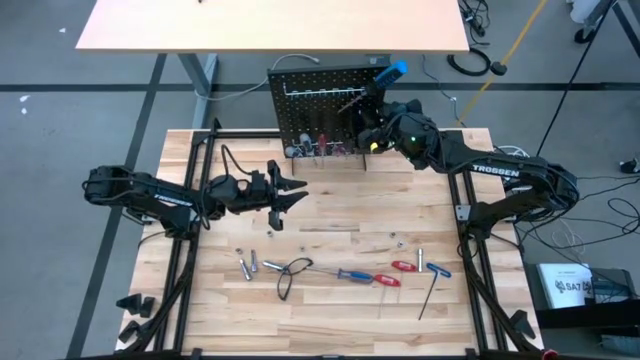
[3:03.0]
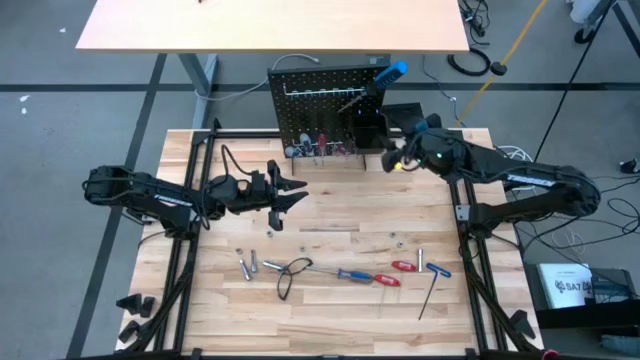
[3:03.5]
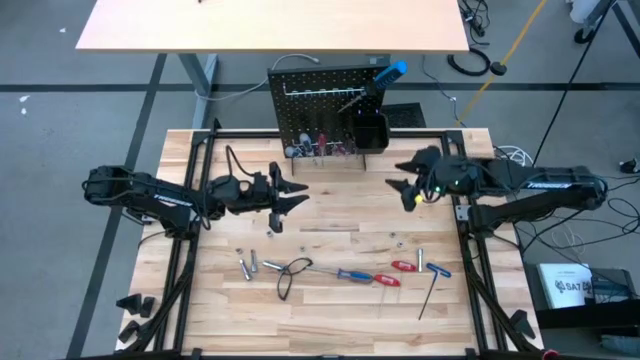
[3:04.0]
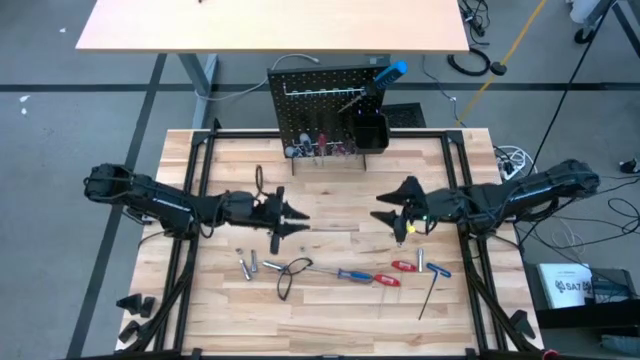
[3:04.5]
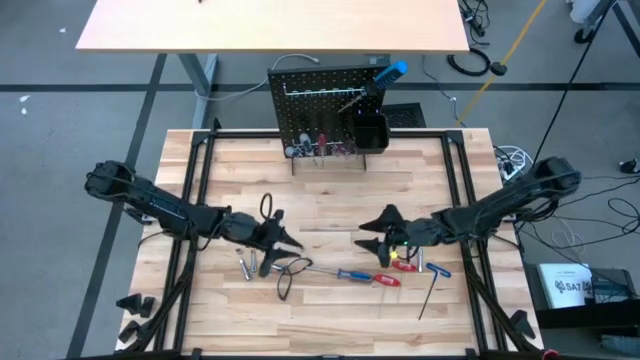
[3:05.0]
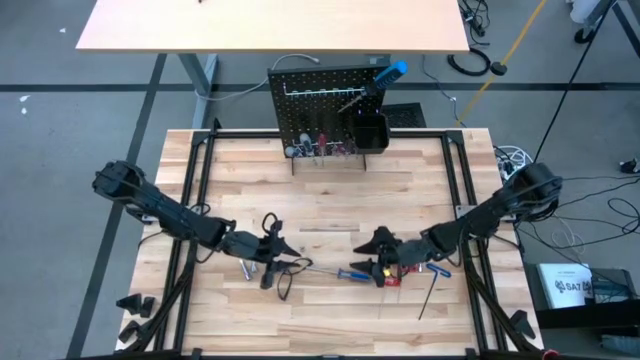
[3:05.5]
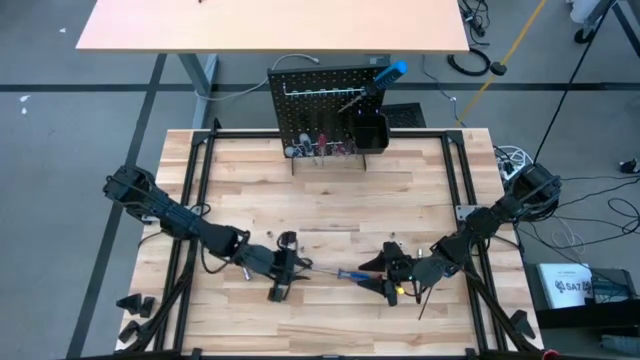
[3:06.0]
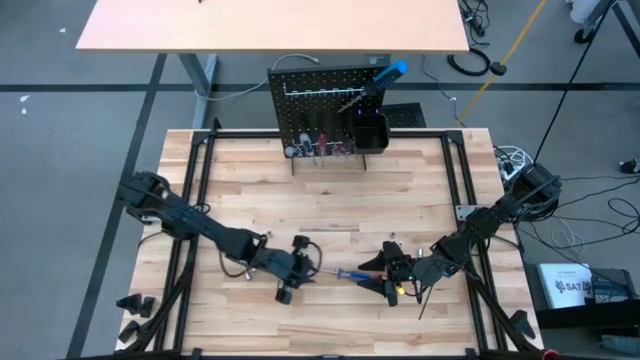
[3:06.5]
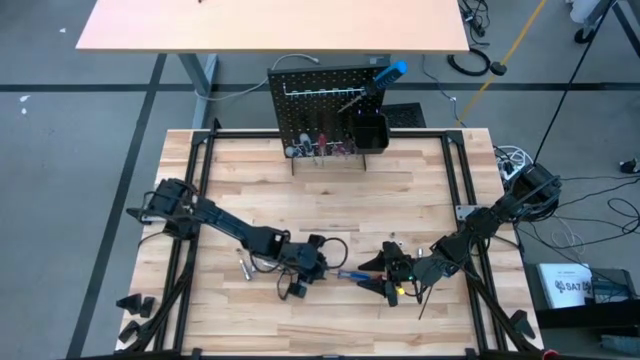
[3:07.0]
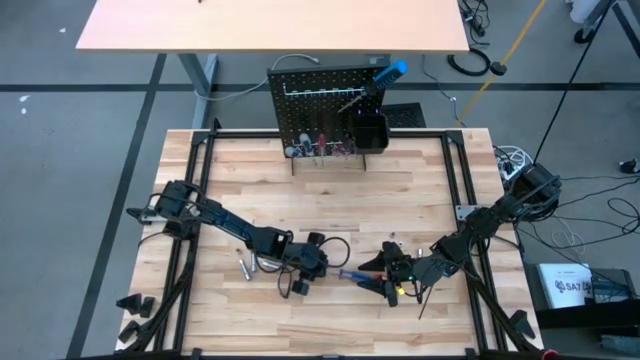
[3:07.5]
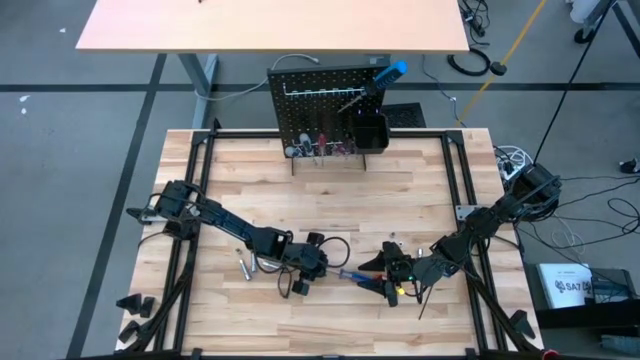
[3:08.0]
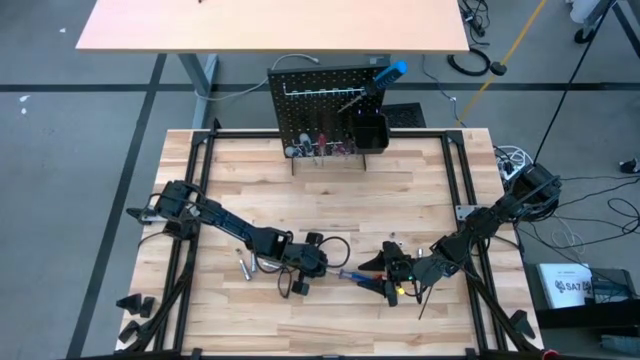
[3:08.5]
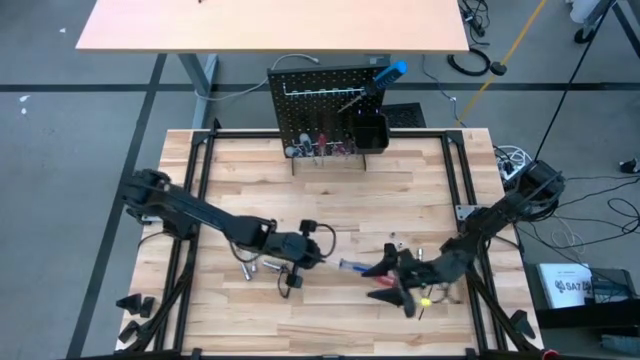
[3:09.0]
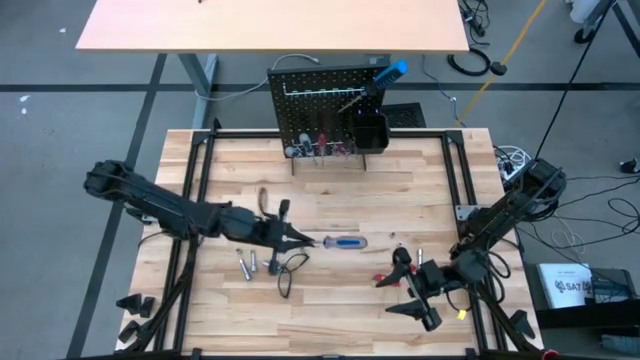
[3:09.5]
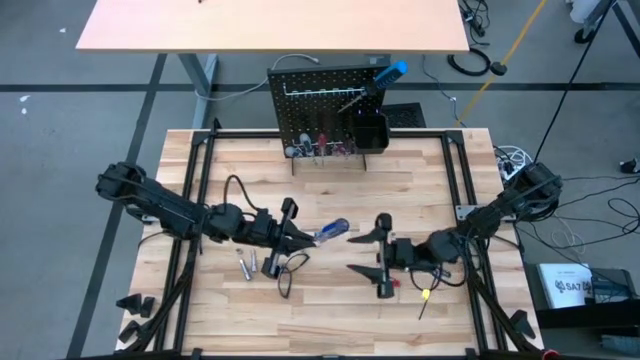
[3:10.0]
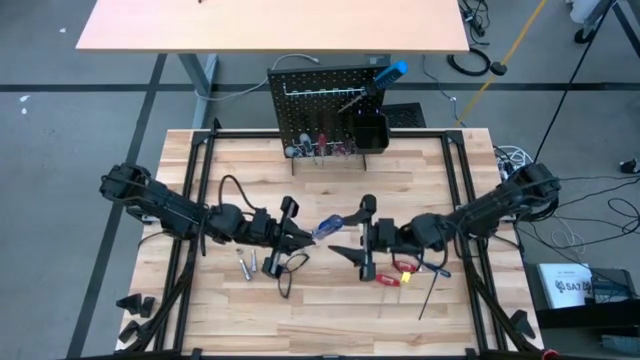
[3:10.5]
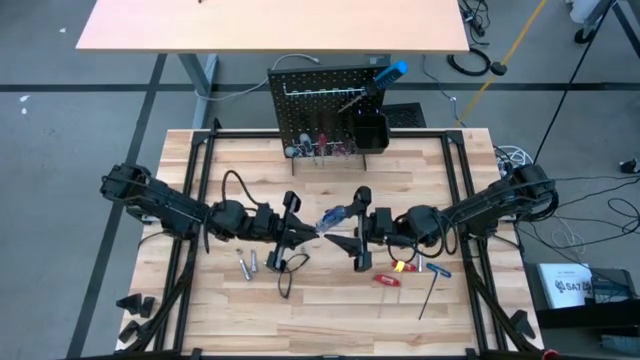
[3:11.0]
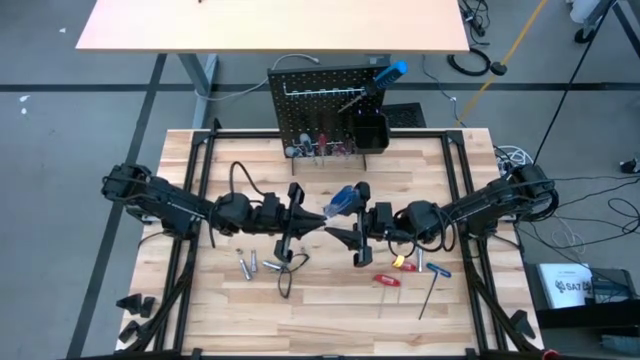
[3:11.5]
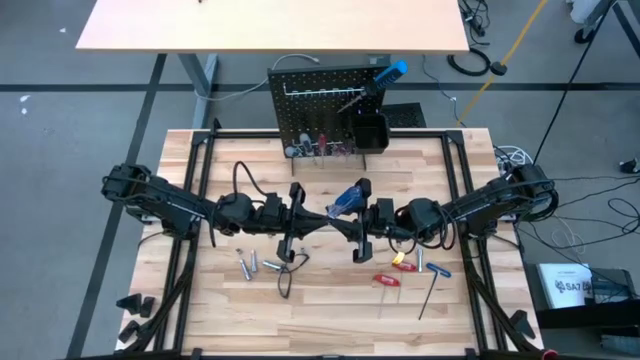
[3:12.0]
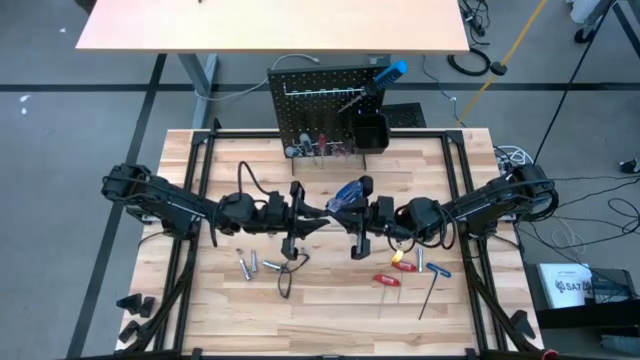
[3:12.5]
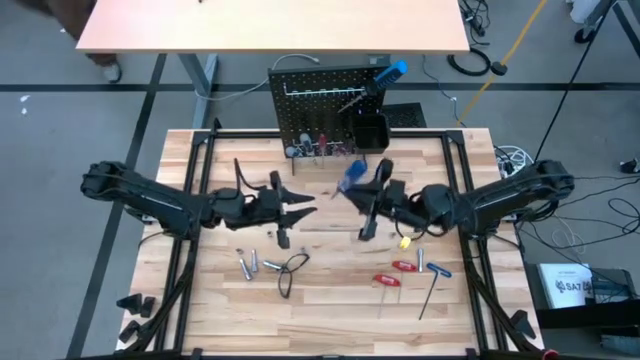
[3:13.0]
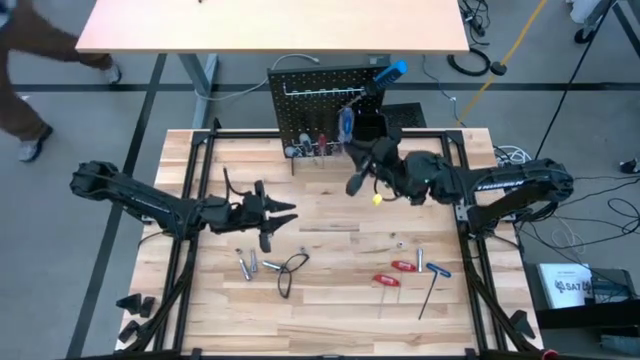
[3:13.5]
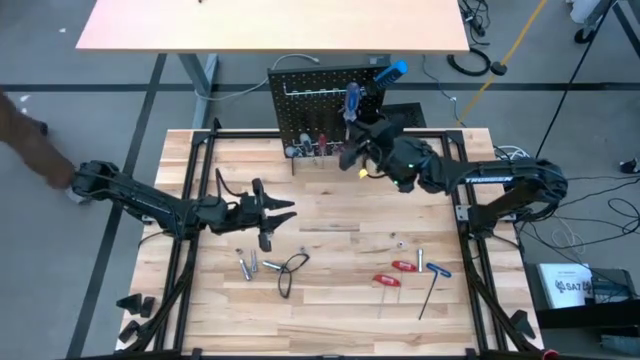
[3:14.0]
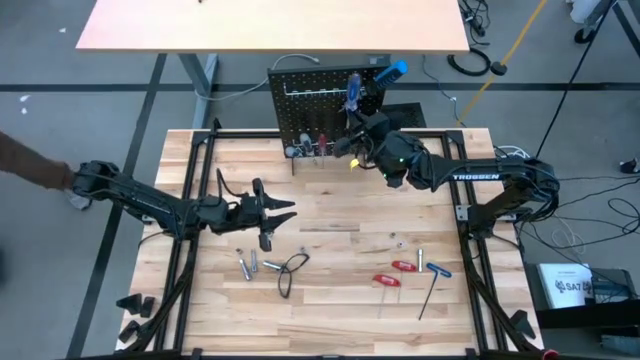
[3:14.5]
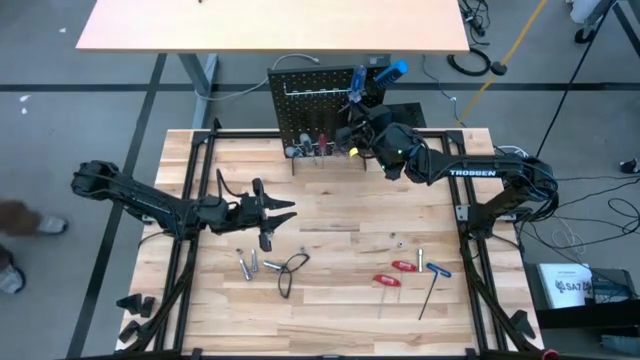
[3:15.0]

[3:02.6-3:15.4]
Task: Hang tools onto peg board
Hang the blue screwdriver on the peg board

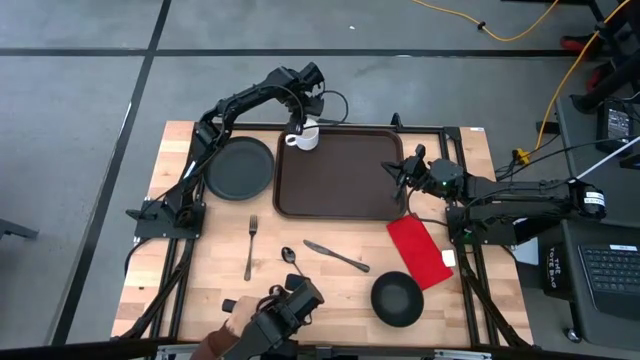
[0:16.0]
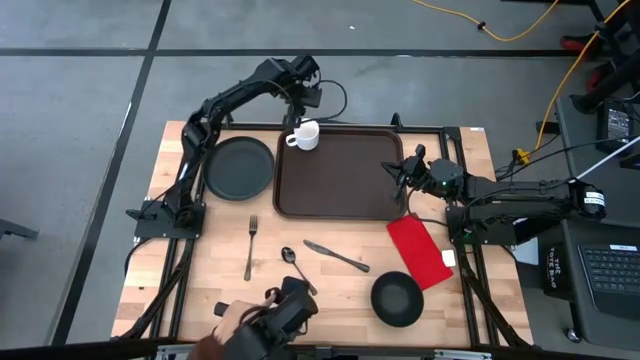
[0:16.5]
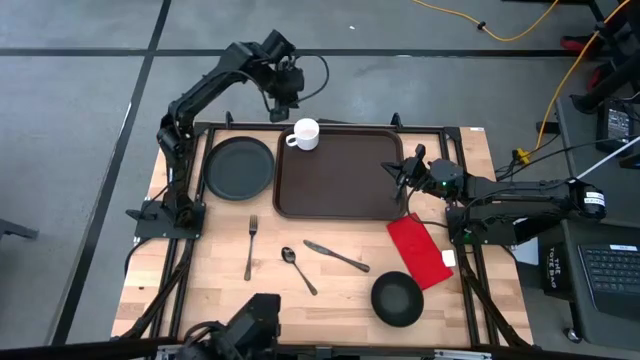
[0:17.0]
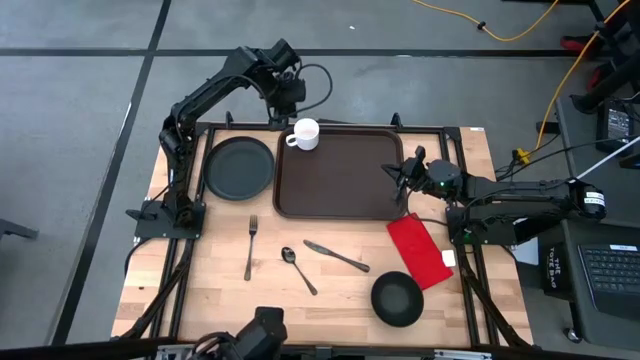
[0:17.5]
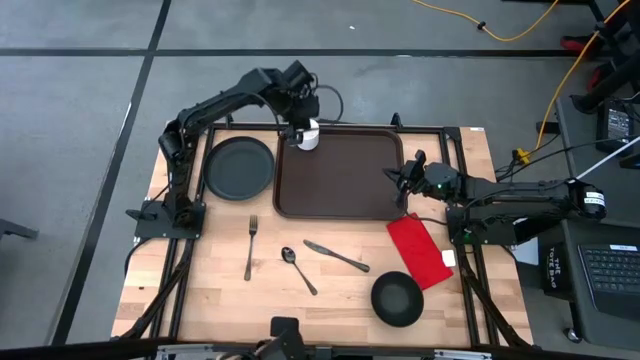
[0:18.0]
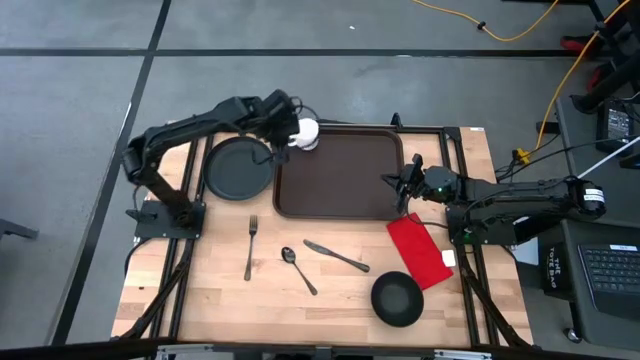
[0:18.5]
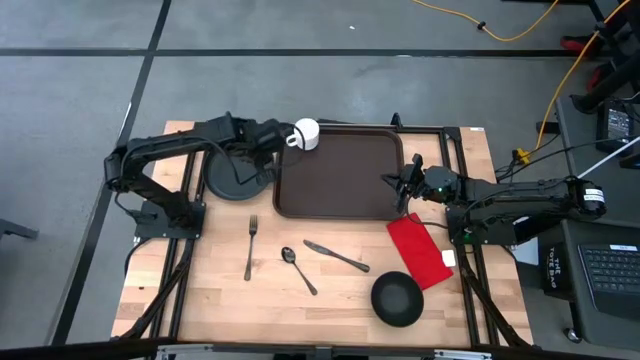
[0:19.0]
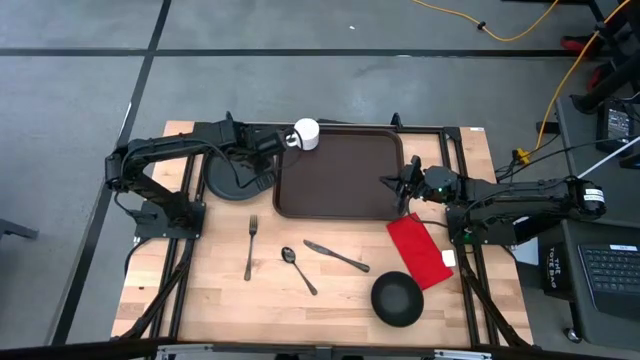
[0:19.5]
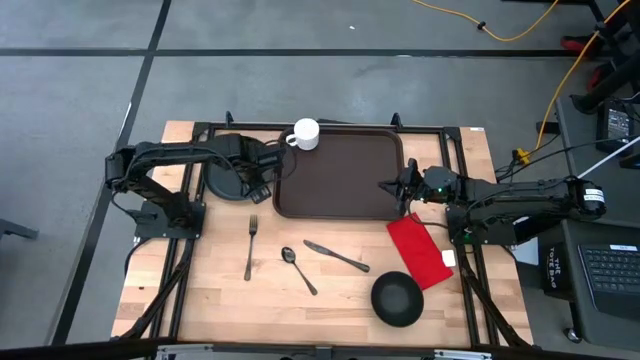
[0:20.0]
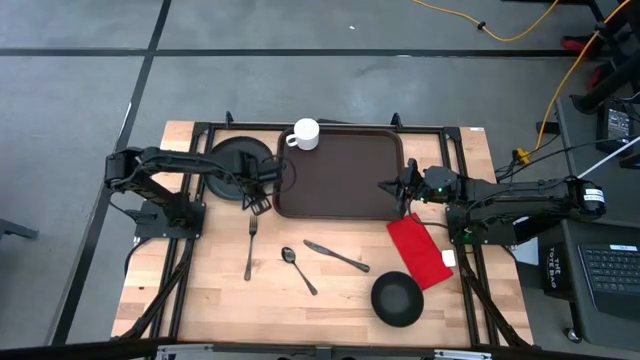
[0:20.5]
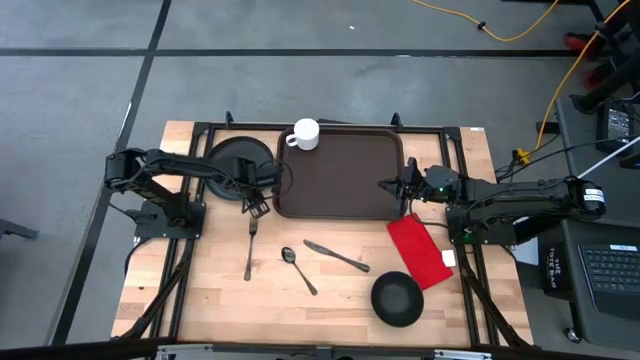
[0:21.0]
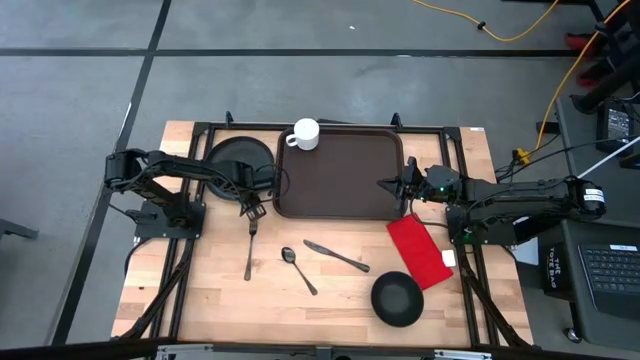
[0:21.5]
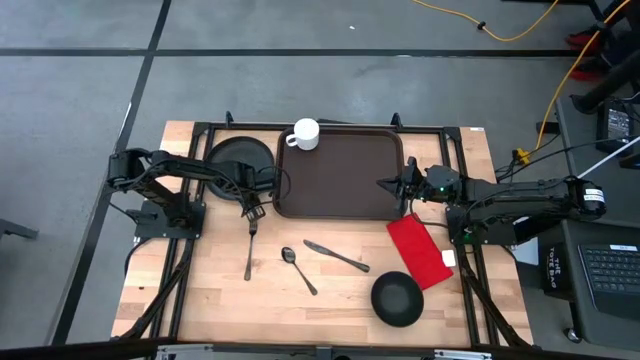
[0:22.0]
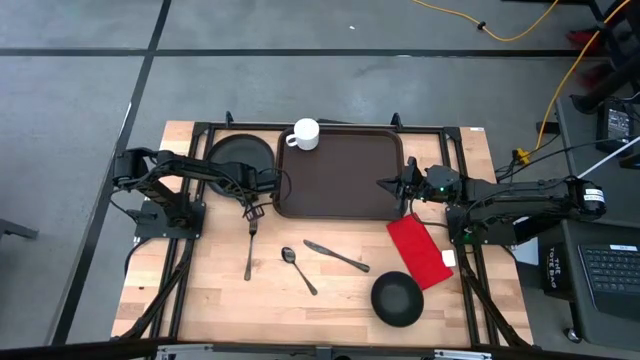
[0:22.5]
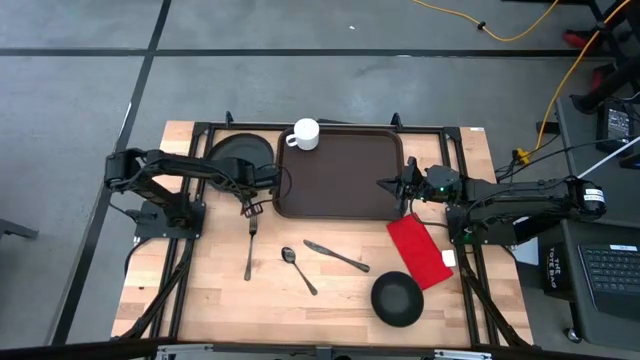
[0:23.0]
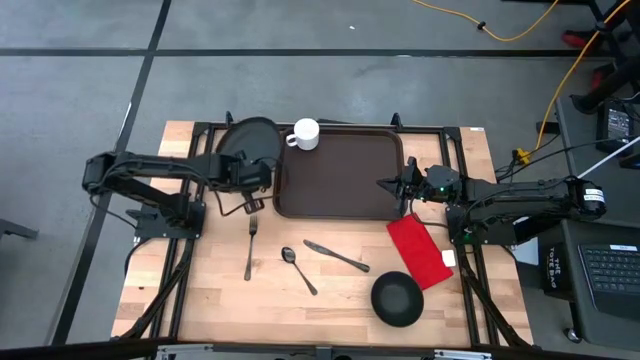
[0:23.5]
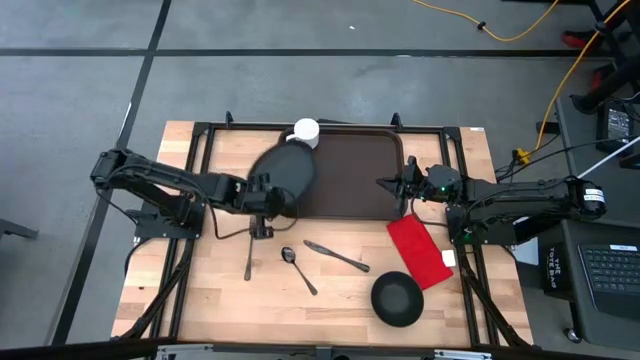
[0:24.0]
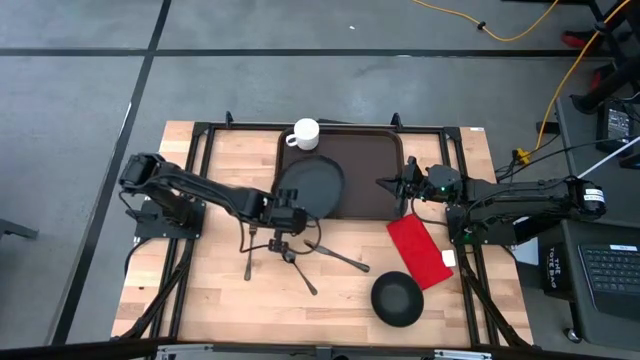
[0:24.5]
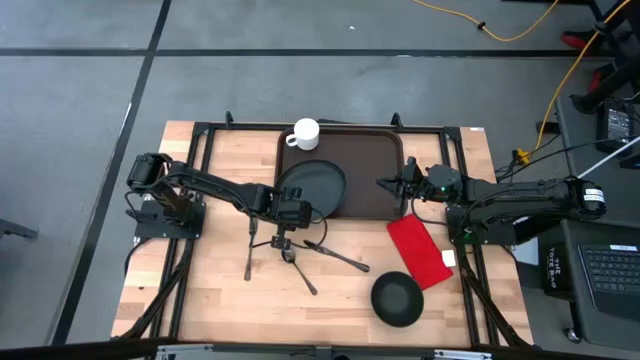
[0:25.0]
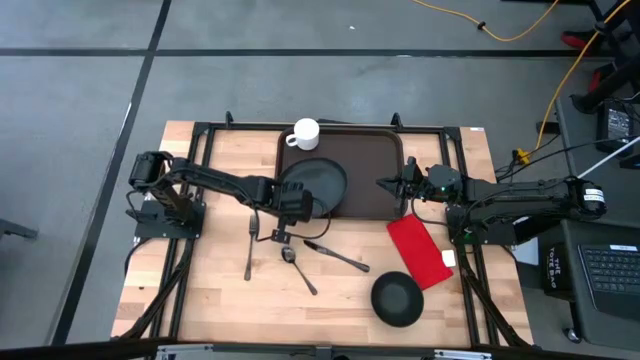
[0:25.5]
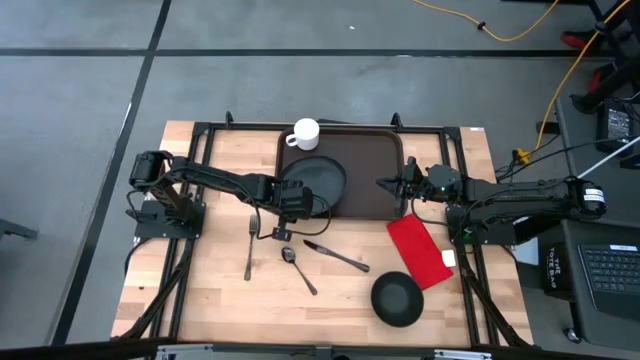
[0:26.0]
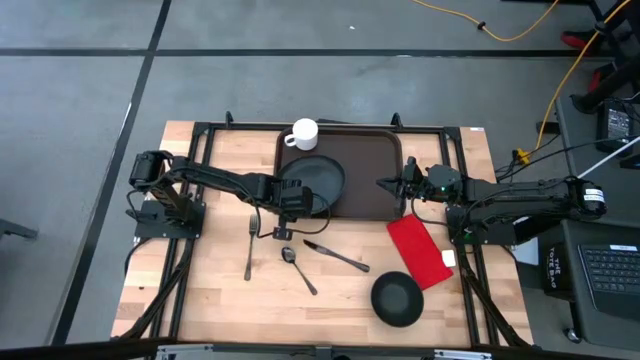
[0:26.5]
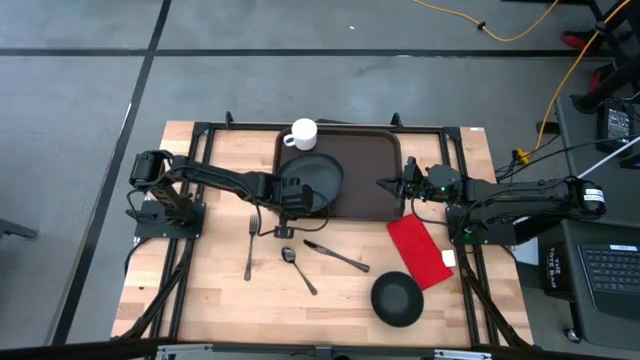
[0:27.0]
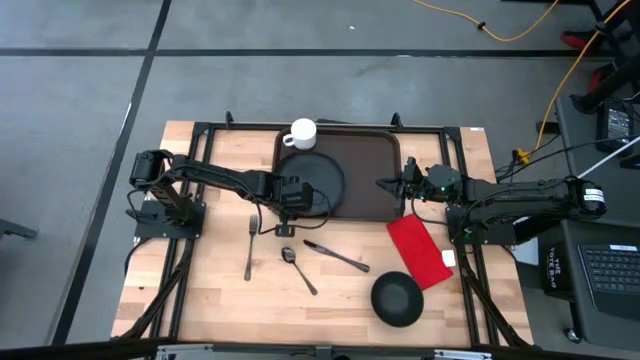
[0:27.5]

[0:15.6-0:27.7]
Task: Set up tray
Put the black plate on the brown serving tray at the bottom of the white mug
